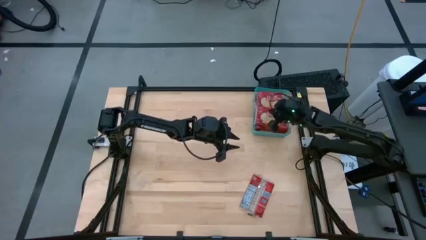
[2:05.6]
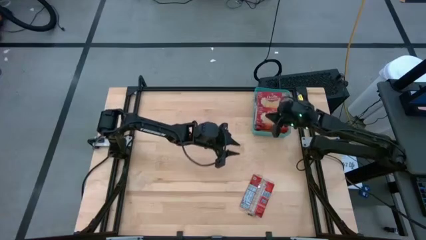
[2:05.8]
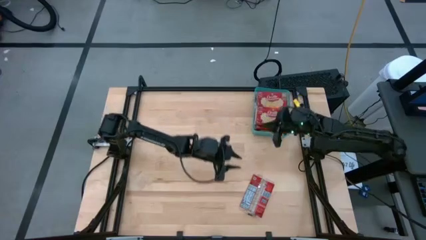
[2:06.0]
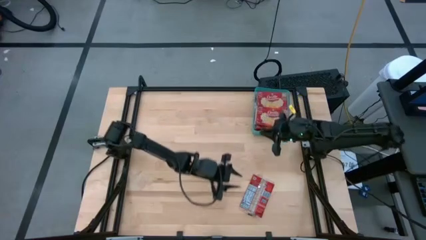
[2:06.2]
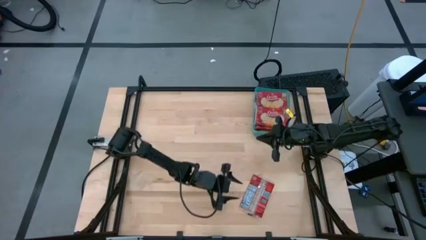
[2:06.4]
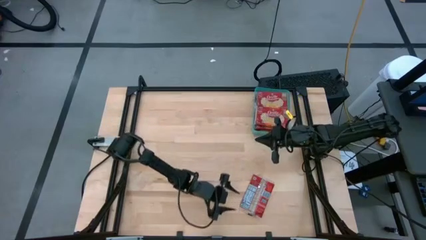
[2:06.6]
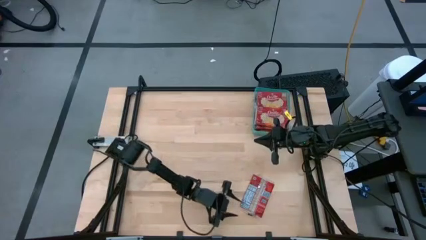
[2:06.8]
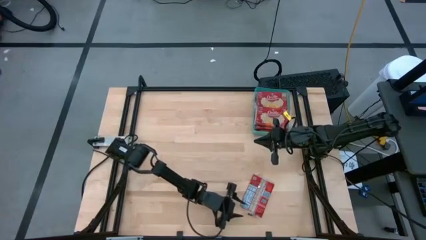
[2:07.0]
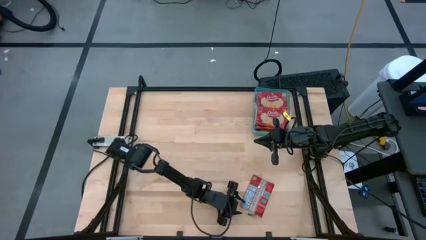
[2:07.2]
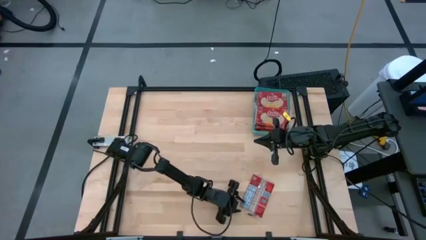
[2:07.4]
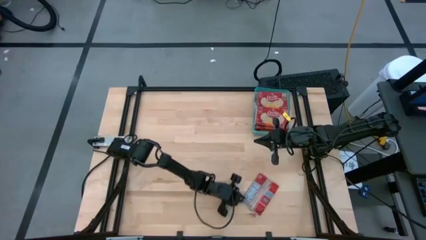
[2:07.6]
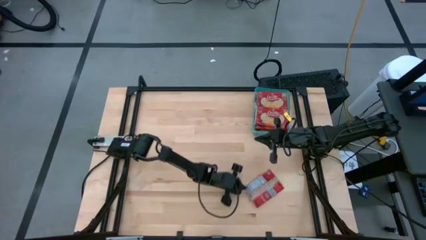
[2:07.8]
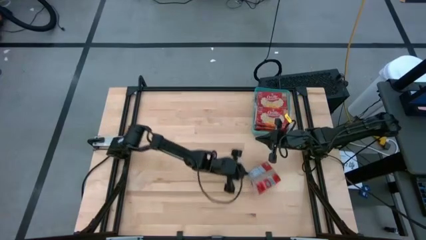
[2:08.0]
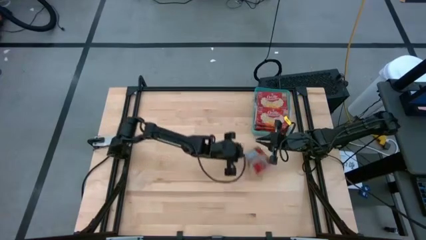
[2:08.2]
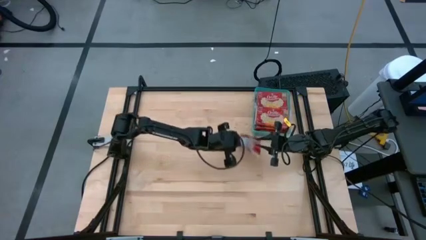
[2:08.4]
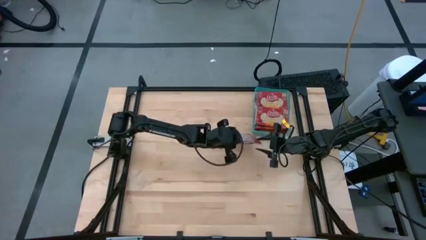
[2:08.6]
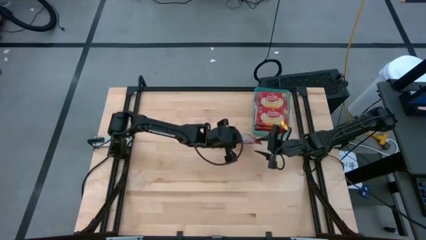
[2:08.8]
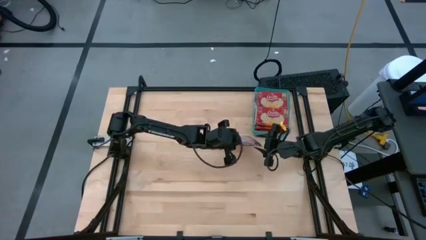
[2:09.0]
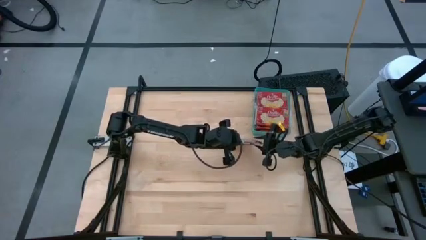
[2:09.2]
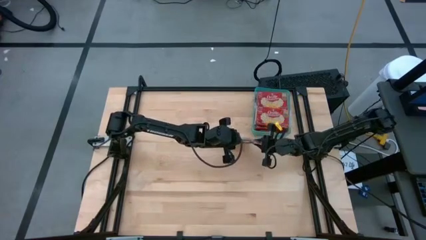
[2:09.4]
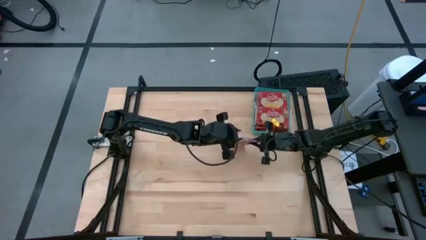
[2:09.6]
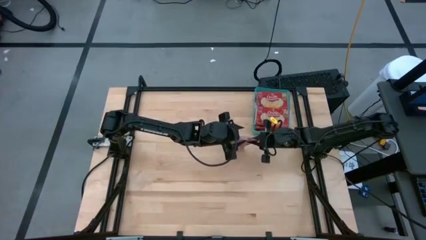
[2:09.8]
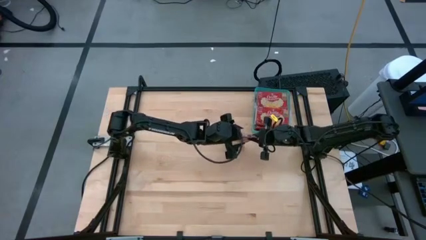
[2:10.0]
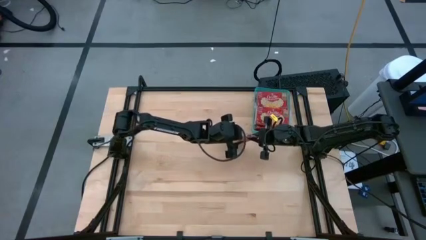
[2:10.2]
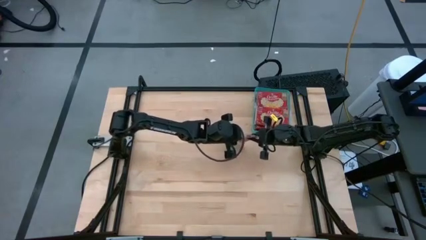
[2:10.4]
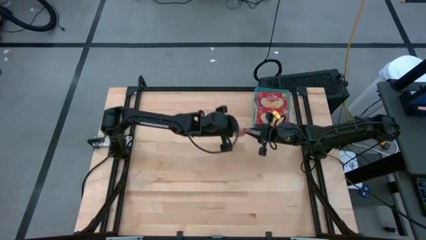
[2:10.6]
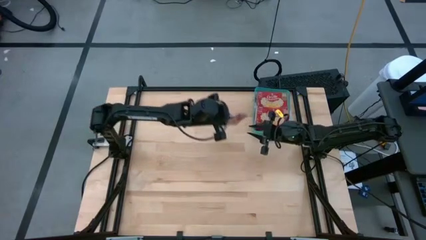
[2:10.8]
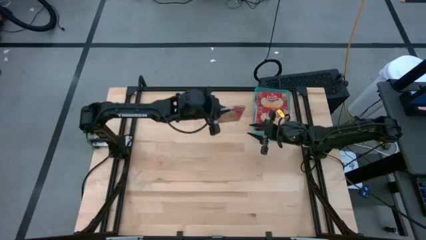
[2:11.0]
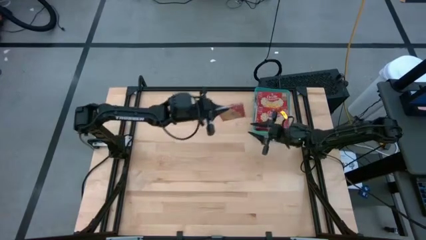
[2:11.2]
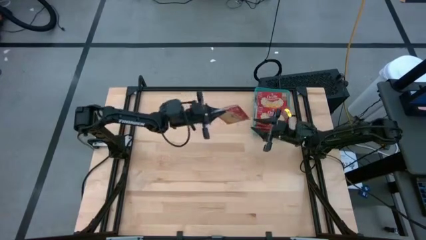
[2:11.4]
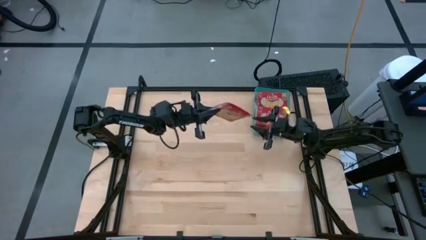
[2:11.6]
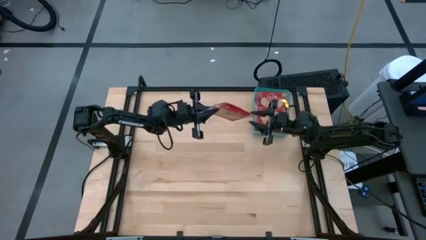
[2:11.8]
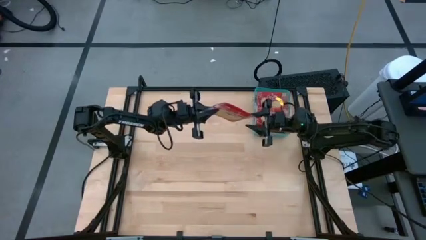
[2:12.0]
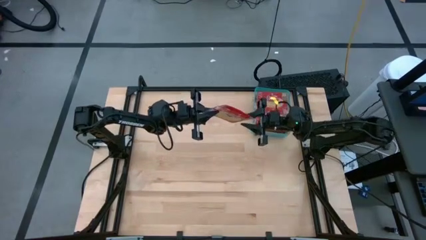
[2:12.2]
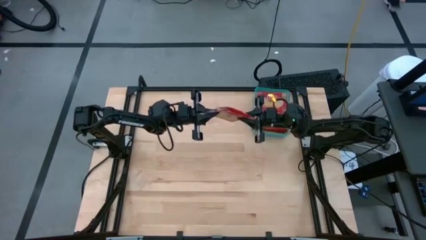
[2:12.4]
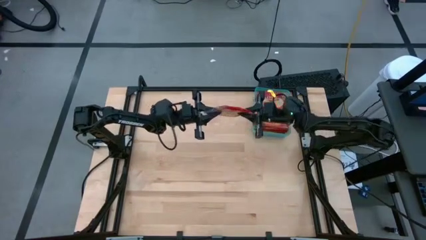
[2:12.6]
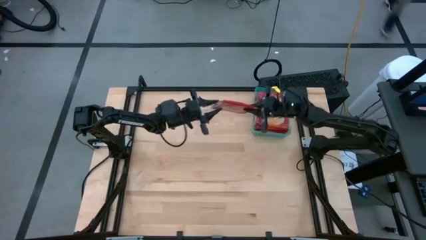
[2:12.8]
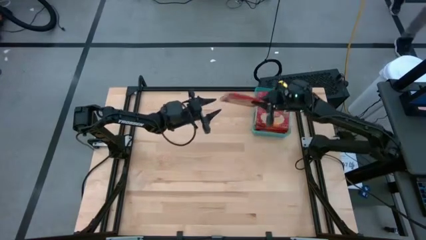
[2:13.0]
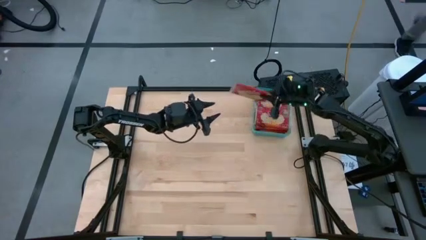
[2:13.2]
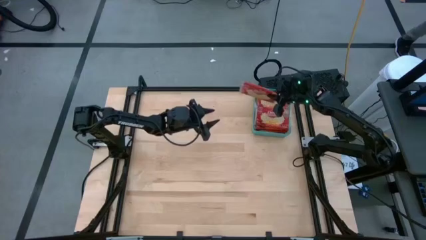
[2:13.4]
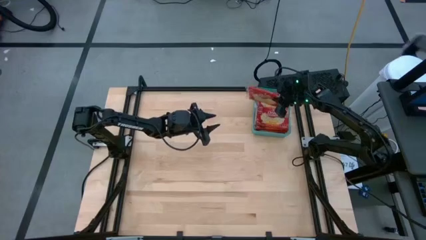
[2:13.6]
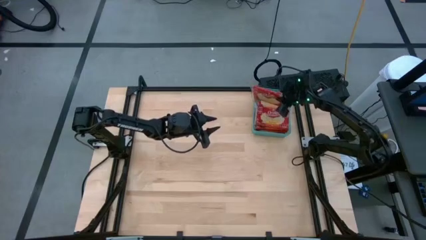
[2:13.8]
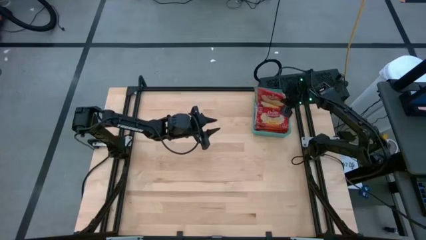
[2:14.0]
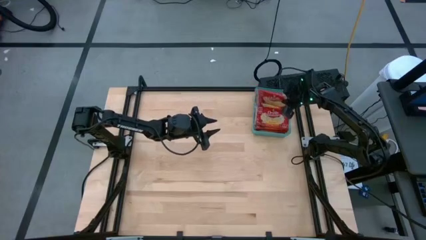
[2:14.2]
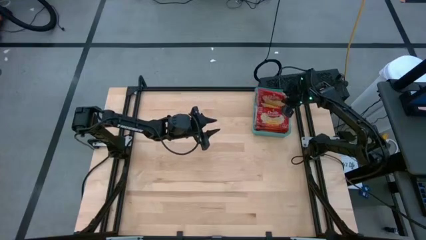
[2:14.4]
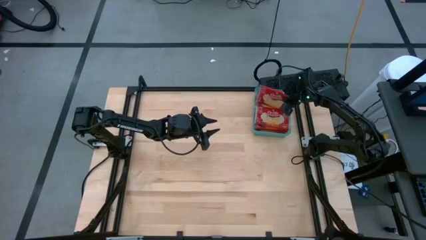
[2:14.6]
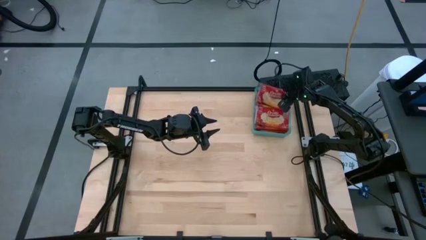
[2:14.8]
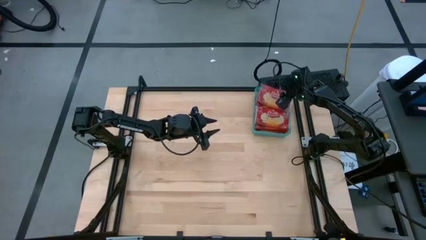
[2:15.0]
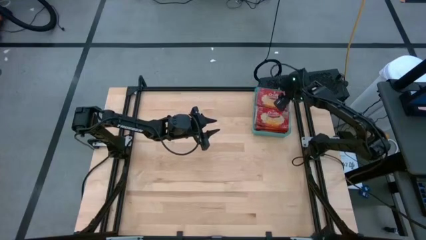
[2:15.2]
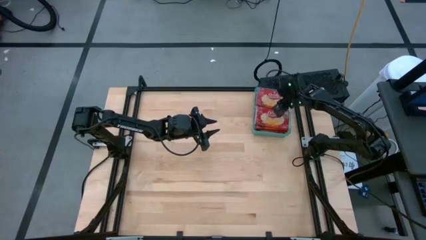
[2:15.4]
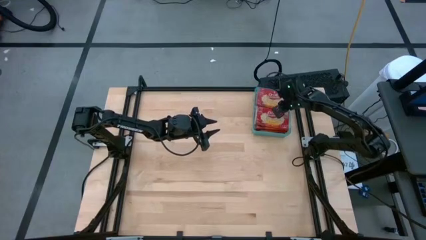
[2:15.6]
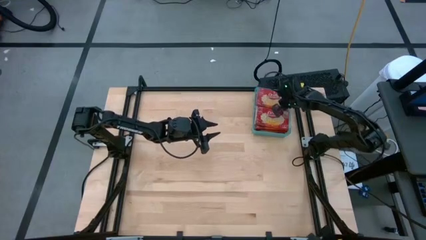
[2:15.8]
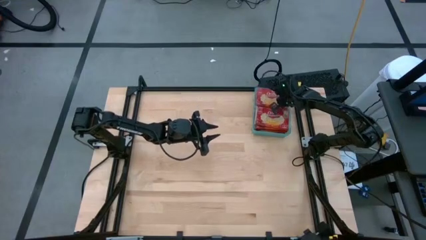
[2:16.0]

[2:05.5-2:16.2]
Task: Sort popcorn bags into baskets
Put the red popcorn bag into the green bin

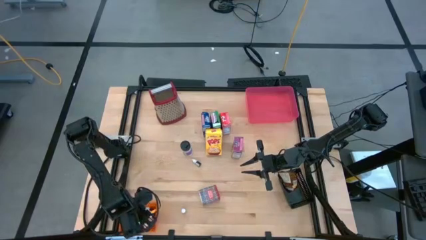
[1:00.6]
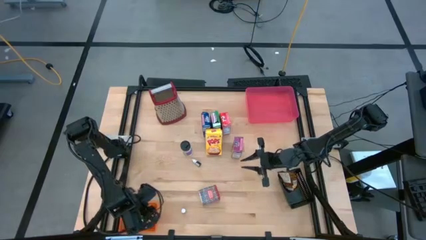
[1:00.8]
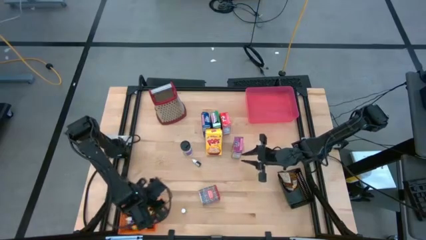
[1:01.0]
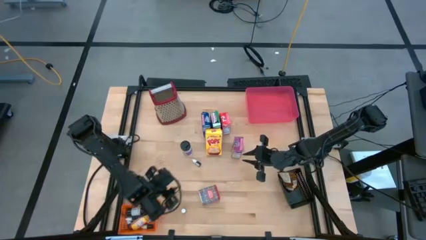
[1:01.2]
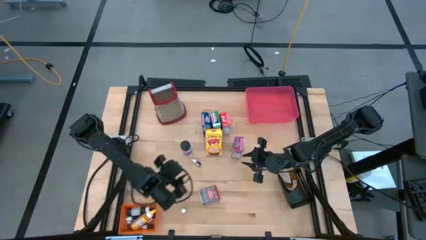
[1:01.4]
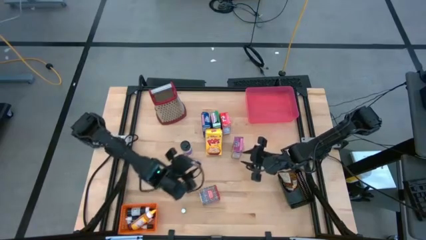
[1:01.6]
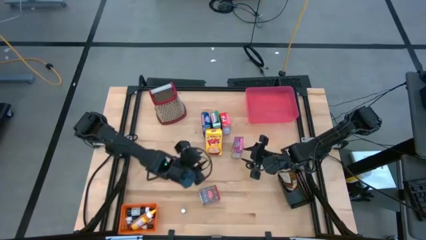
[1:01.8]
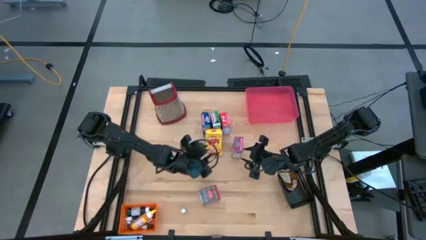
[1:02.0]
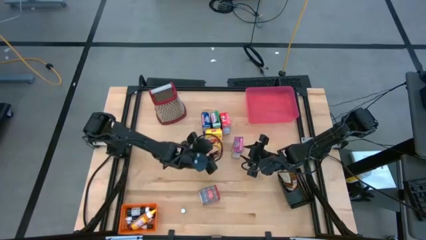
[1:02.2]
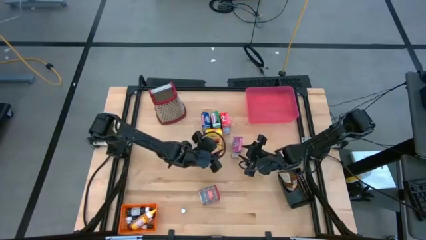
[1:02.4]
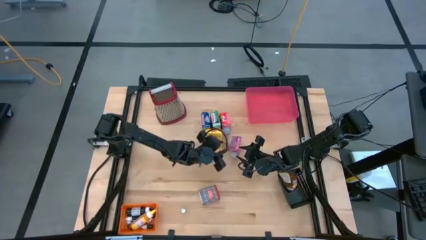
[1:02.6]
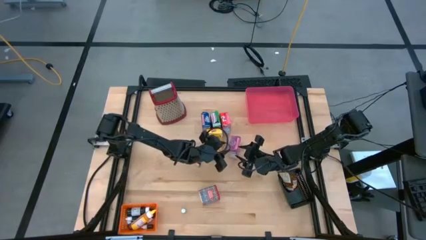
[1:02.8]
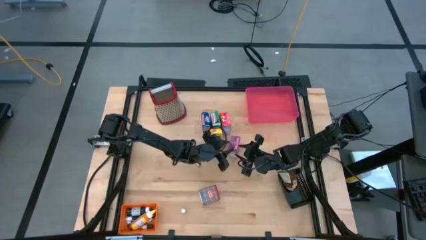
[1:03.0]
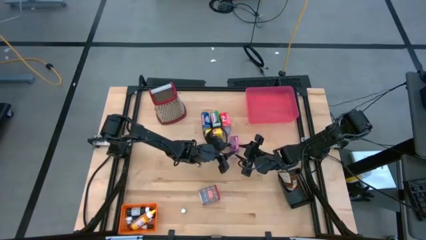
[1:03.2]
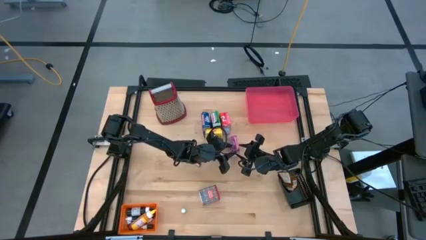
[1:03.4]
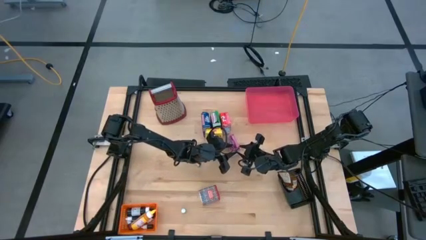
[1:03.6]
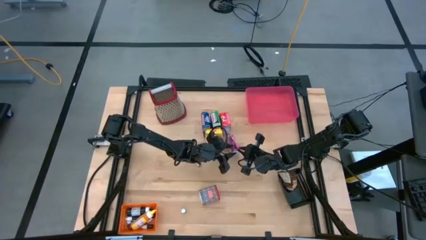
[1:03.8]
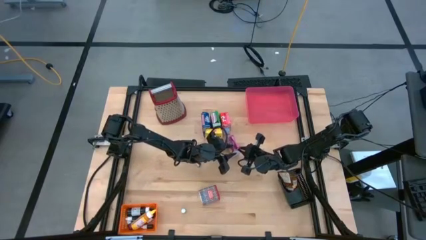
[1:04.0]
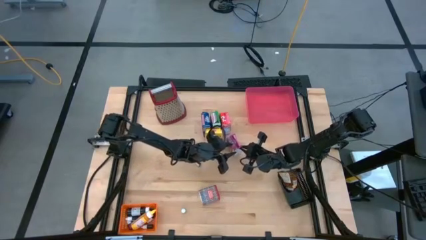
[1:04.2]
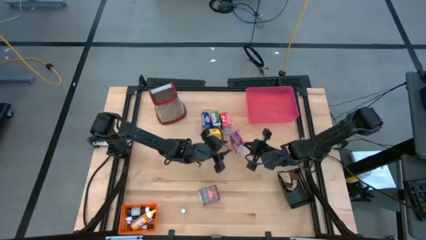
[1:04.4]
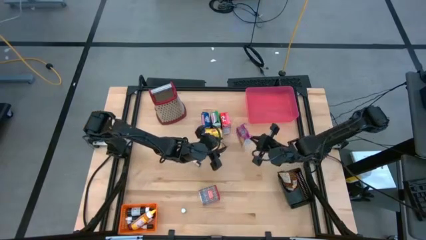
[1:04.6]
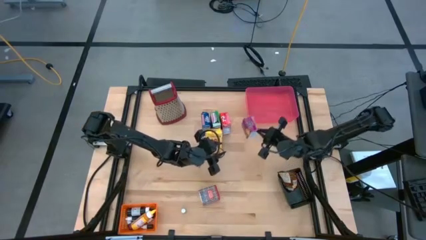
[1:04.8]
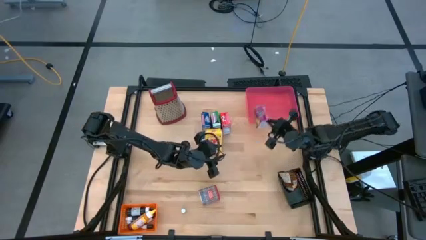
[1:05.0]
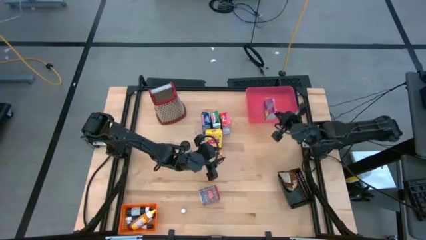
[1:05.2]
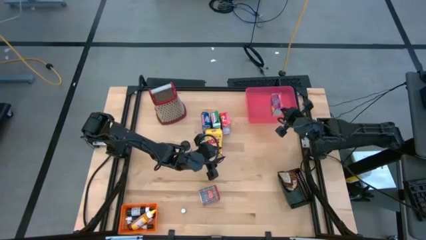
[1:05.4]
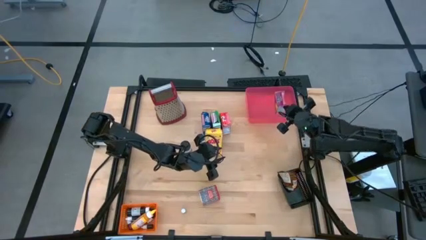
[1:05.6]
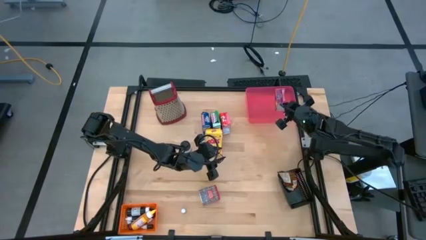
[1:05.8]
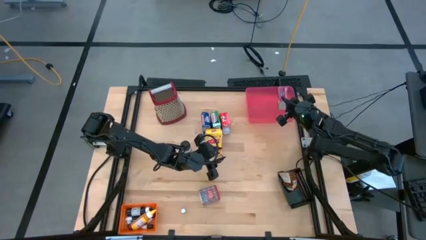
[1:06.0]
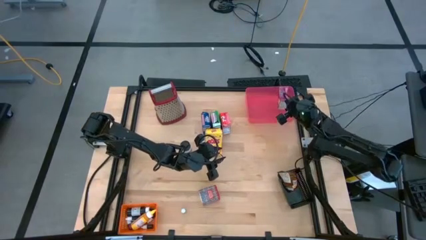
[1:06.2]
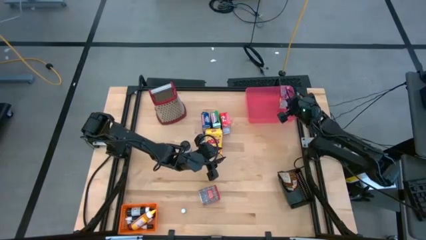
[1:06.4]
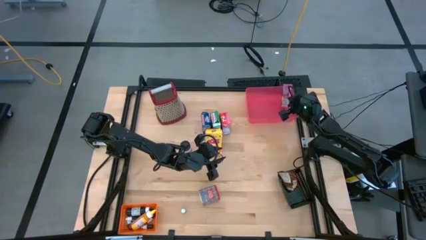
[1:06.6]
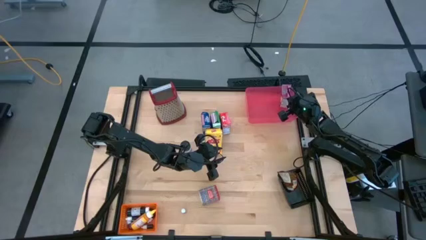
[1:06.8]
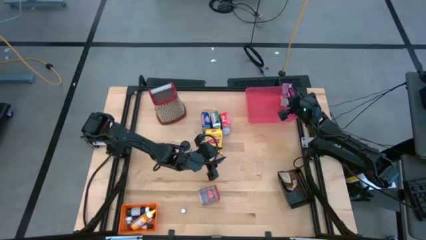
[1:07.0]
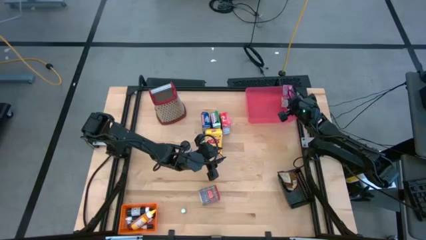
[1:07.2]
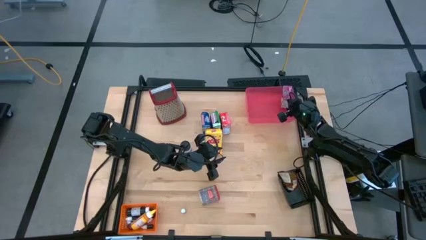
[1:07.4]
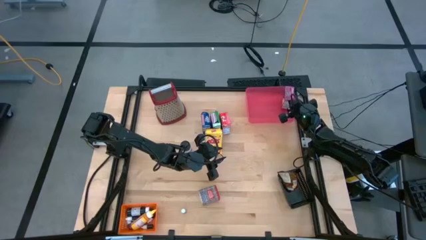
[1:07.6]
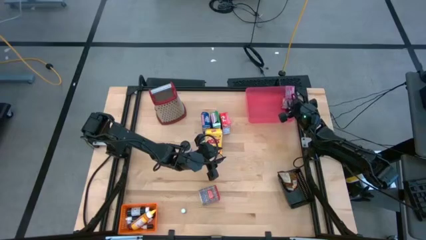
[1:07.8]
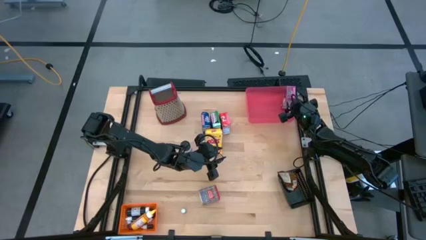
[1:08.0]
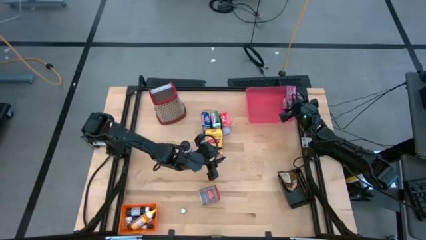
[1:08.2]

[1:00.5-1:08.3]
Task: Pick & Place Kitchen Items
Put the violet cereal box into the pink bin
